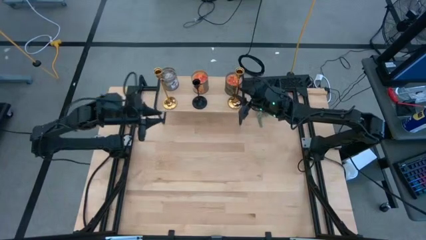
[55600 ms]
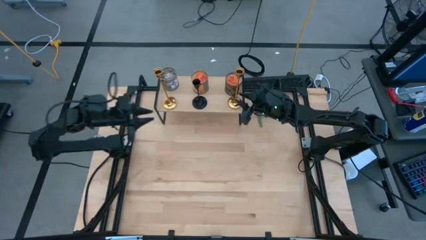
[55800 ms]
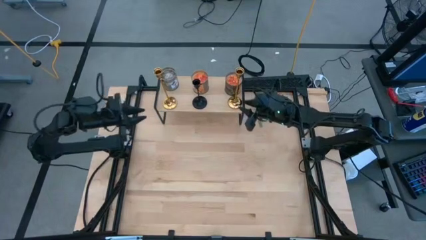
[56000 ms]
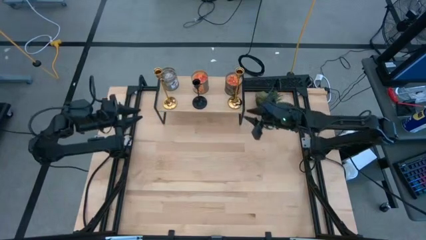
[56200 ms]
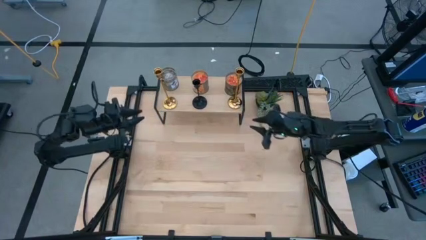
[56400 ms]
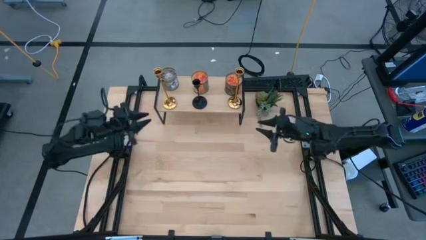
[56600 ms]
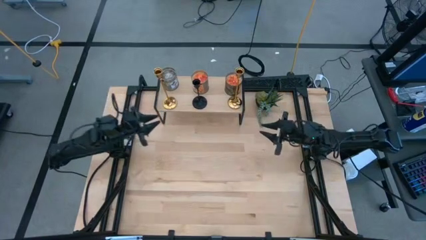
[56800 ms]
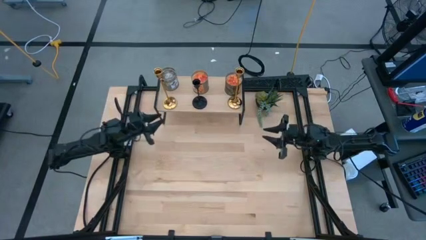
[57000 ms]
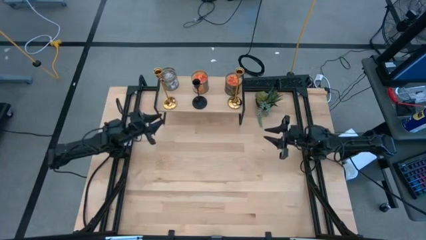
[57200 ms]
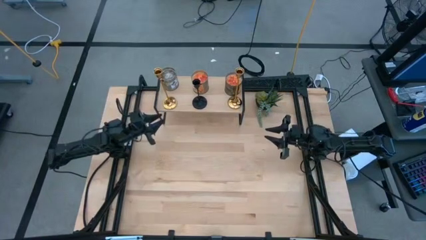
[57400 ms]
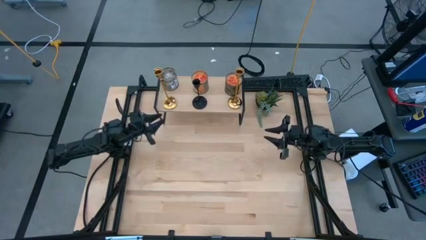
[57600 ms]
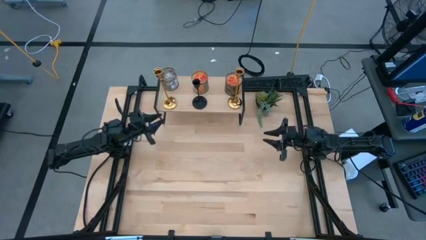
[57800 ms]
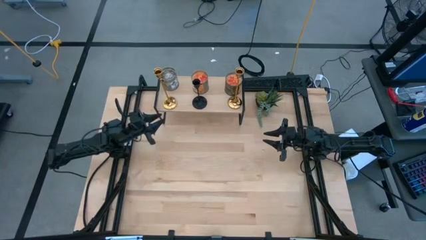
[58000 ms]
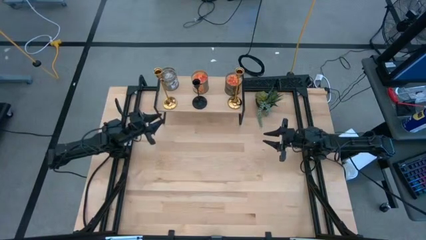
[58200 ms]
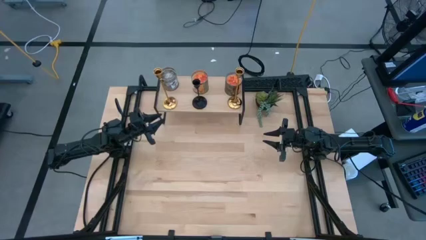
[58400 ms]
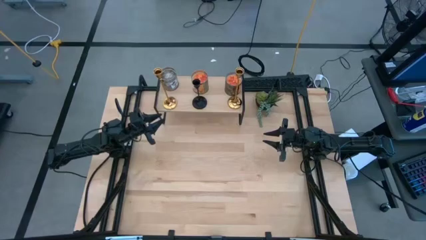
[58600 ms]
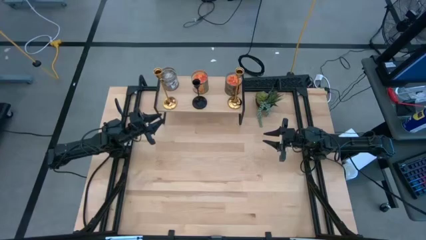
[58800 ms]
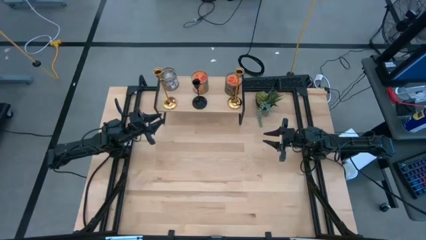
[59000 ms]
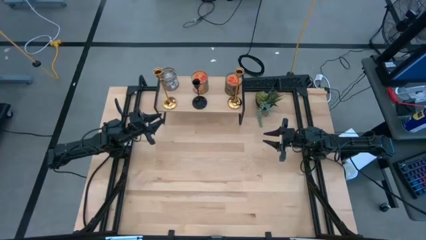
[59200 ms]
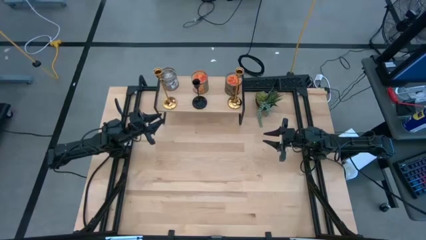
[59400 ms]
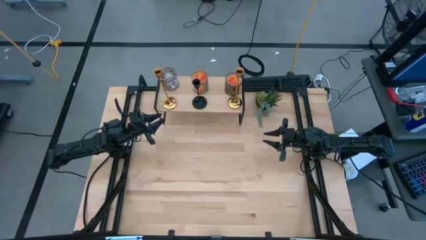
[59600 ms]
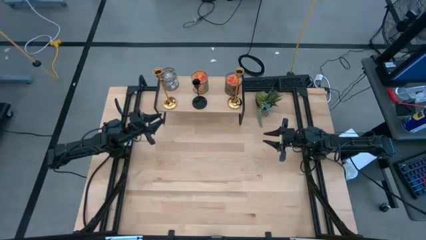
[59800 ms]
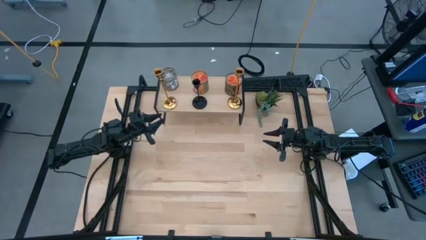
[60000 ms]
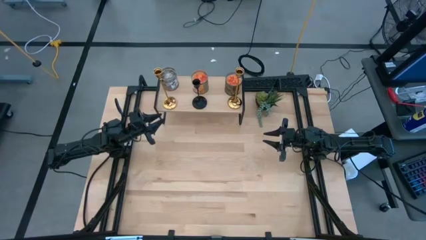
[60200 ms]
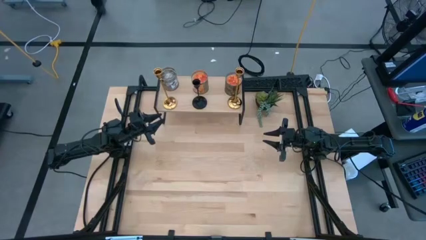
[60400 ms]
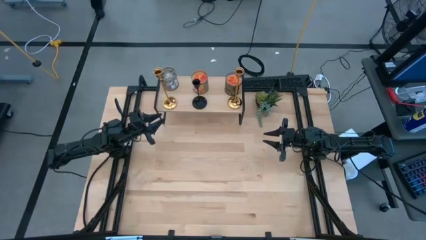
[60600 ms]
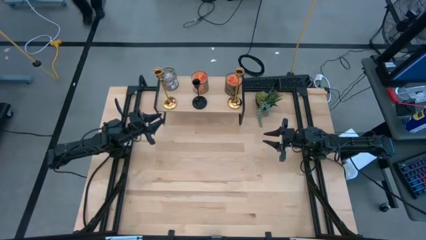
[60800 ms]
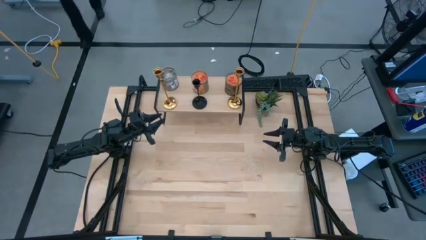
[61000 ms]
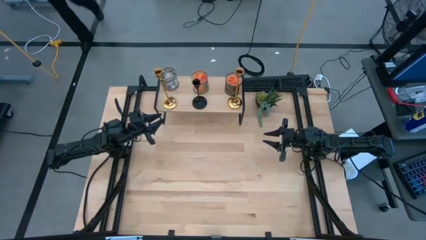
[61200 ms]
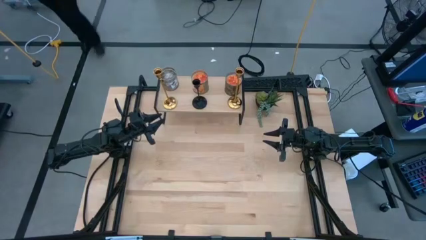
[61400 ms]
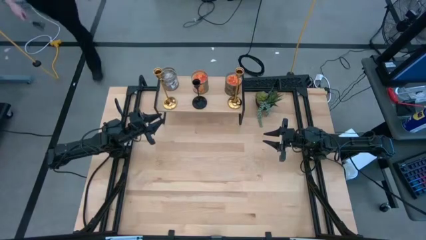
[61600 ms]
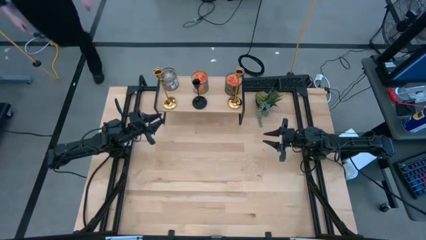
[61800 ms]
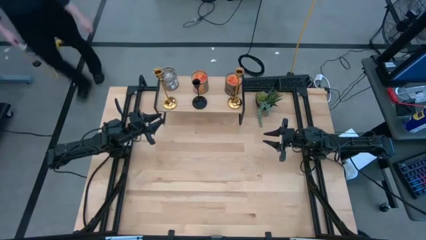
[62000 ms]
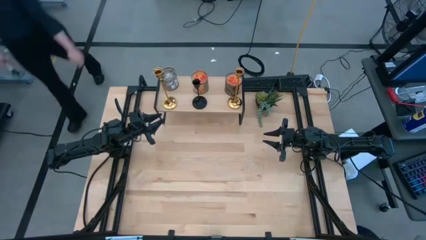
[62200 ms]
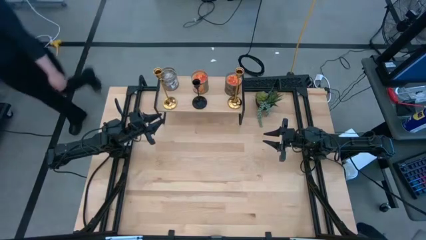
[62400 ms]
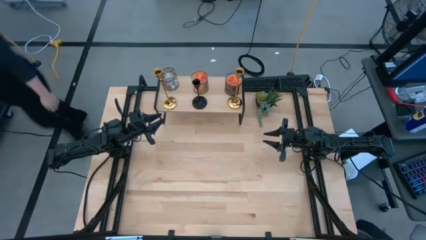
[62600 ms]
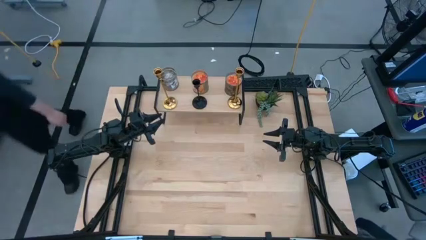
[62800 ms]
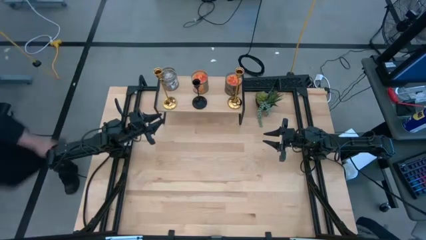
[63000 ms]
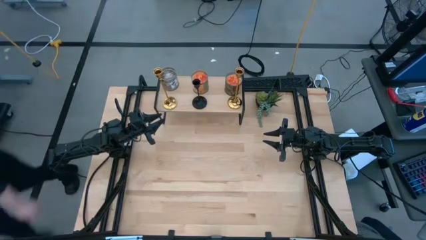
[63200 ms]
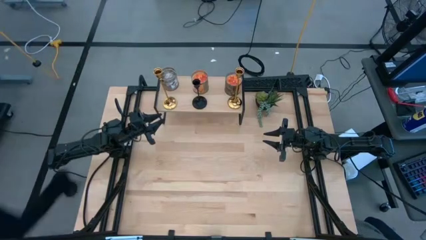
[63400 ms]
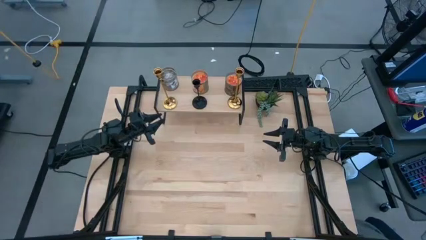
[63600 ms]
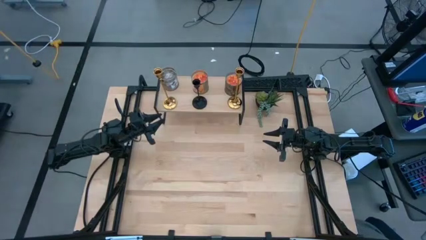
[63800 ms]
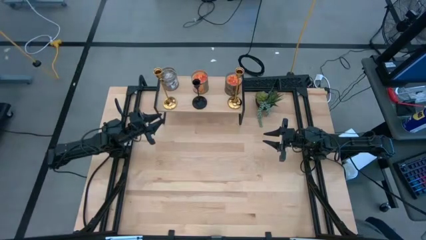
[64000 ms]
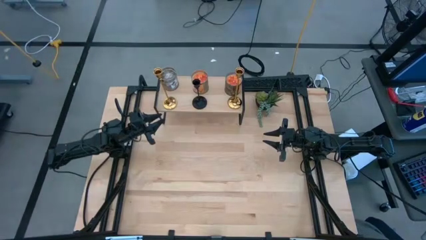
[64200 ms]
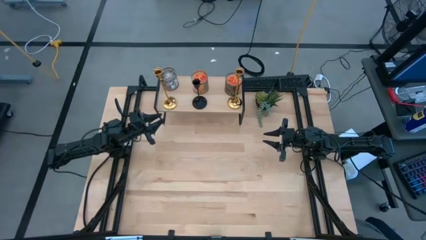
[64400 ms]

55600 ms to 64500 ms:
Task: Pick & Place candle stick holders
Return to Home Position

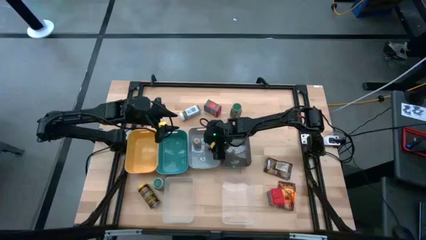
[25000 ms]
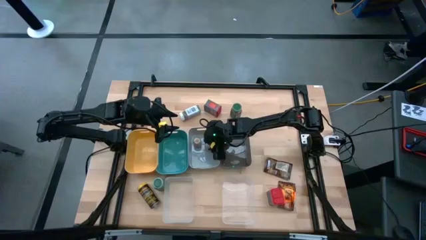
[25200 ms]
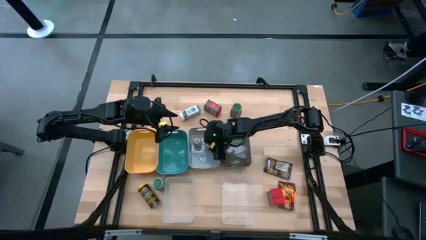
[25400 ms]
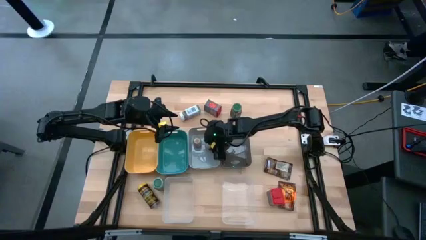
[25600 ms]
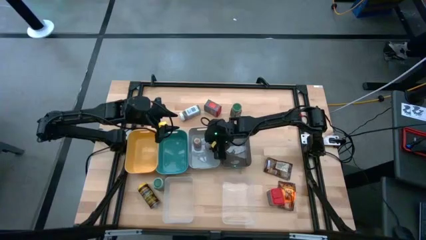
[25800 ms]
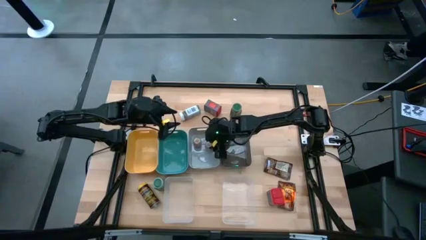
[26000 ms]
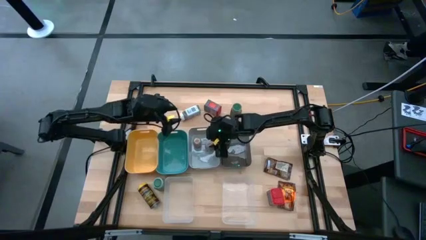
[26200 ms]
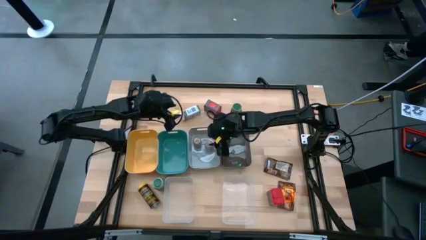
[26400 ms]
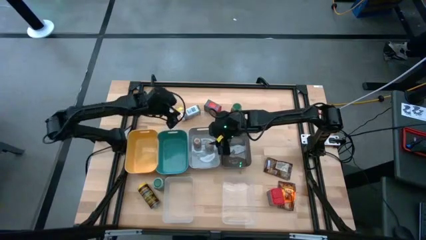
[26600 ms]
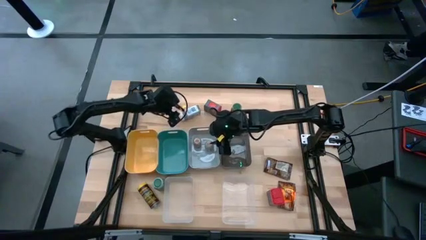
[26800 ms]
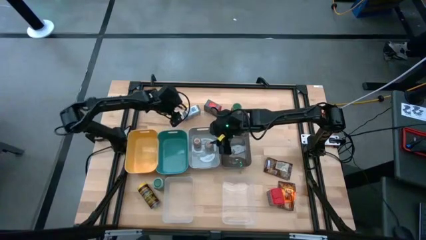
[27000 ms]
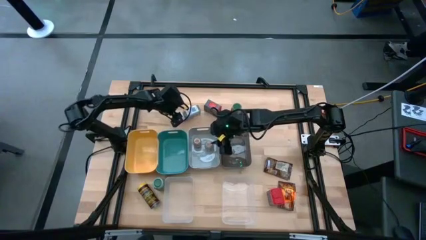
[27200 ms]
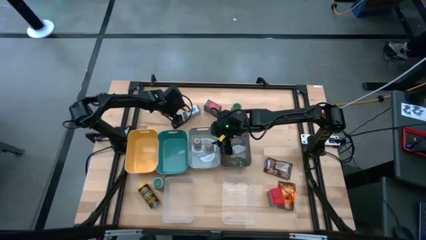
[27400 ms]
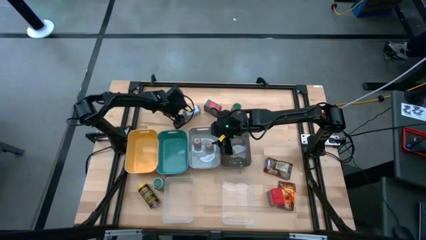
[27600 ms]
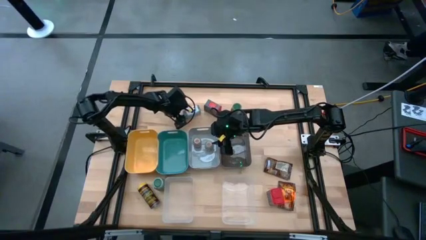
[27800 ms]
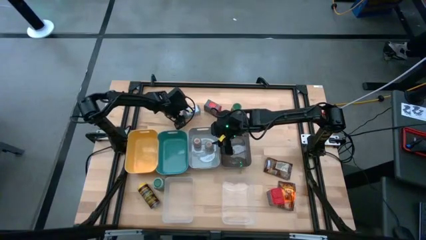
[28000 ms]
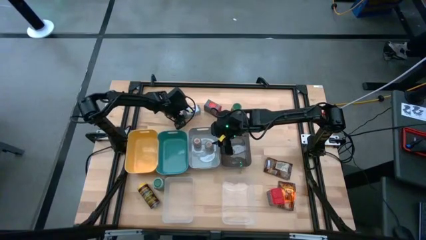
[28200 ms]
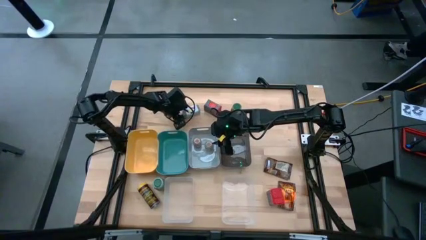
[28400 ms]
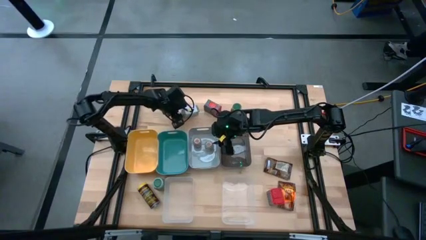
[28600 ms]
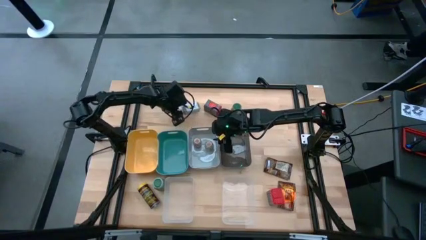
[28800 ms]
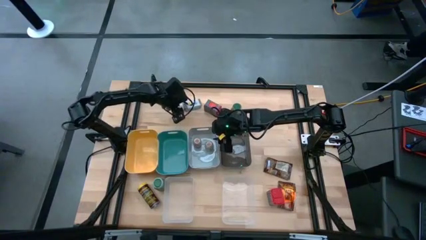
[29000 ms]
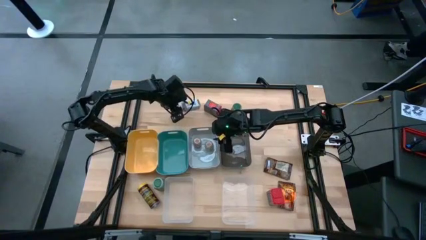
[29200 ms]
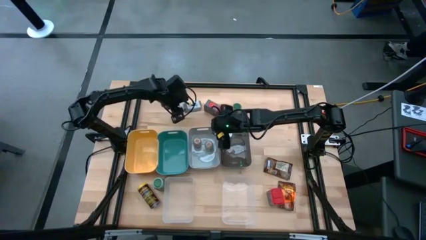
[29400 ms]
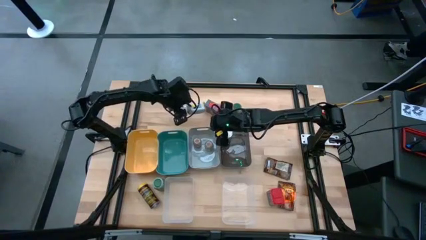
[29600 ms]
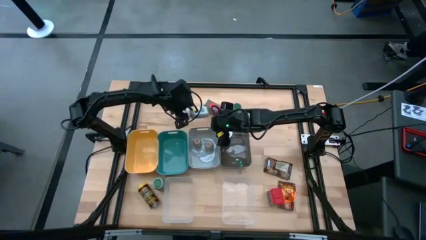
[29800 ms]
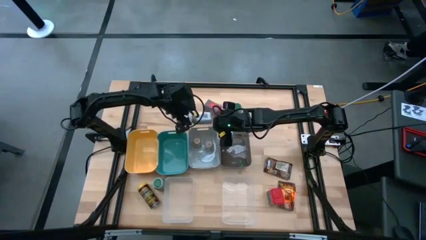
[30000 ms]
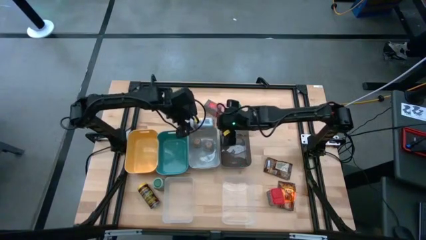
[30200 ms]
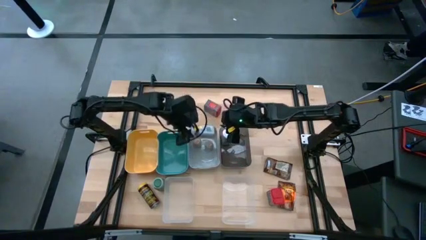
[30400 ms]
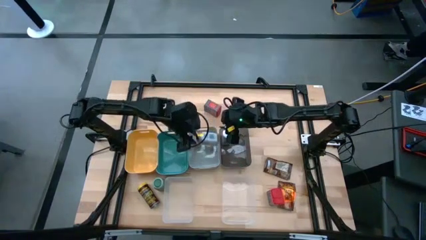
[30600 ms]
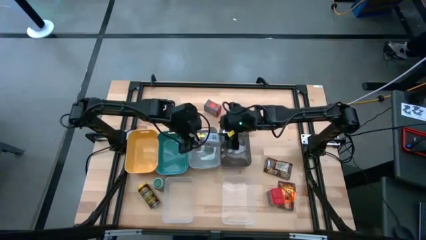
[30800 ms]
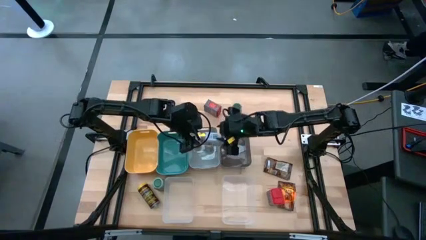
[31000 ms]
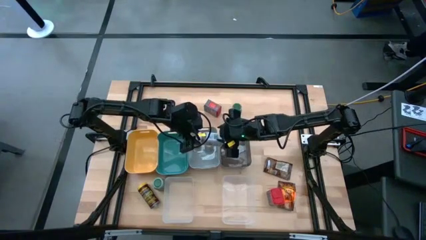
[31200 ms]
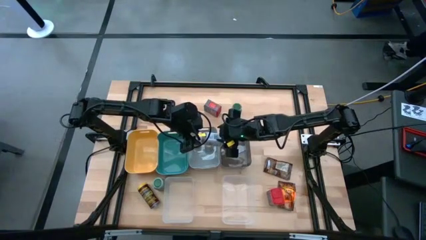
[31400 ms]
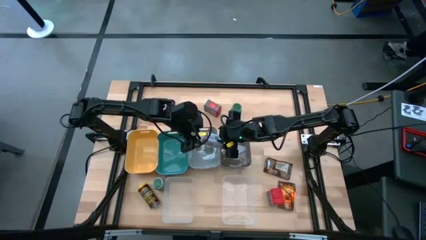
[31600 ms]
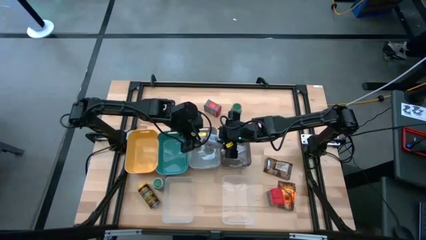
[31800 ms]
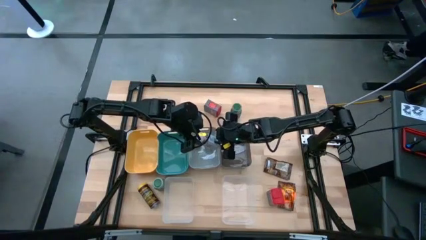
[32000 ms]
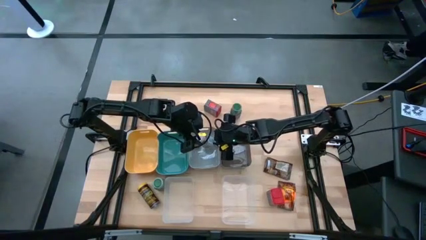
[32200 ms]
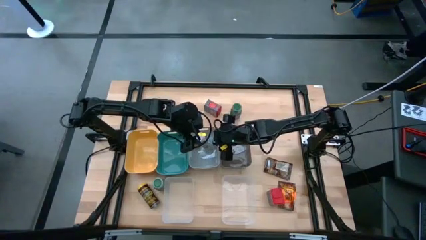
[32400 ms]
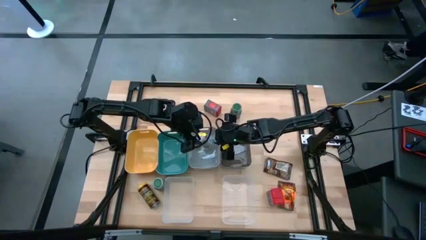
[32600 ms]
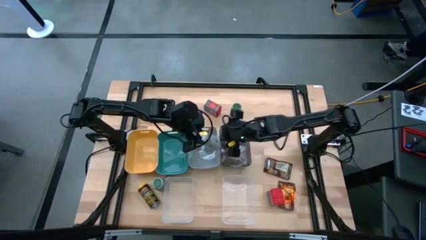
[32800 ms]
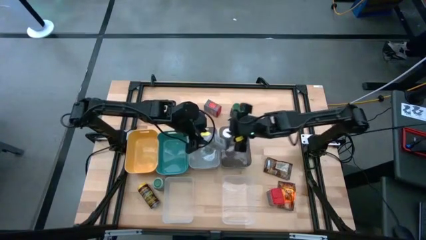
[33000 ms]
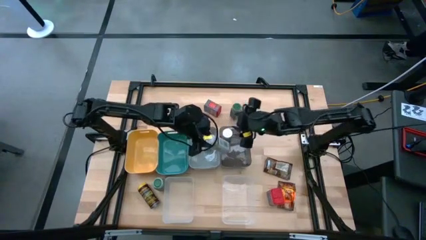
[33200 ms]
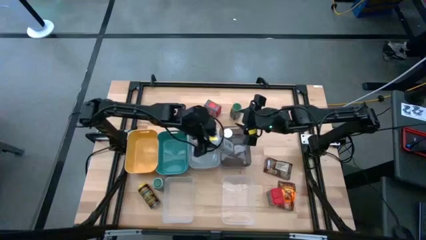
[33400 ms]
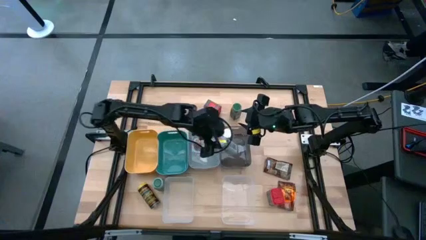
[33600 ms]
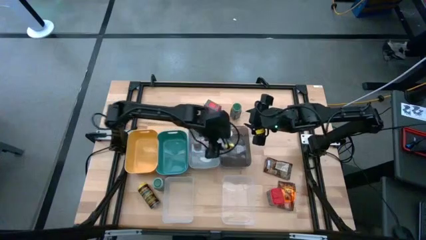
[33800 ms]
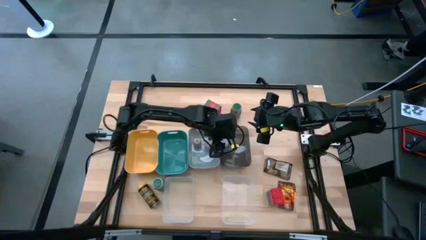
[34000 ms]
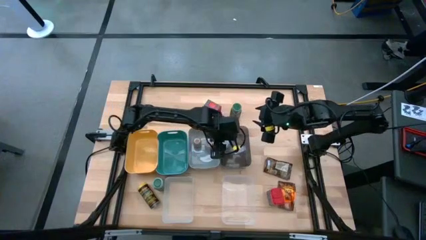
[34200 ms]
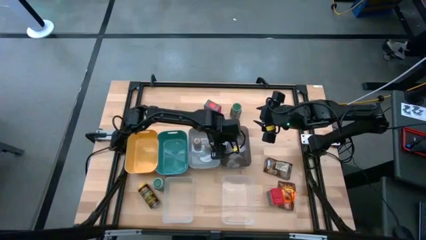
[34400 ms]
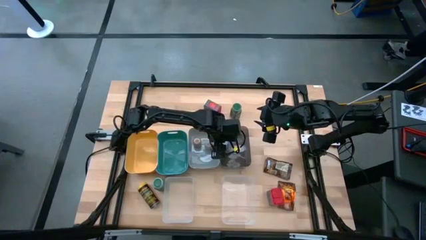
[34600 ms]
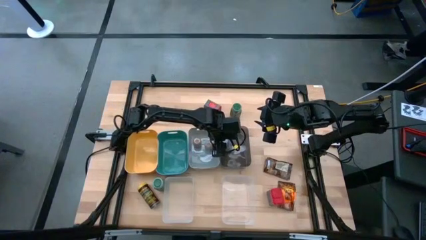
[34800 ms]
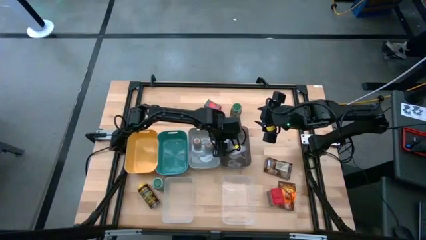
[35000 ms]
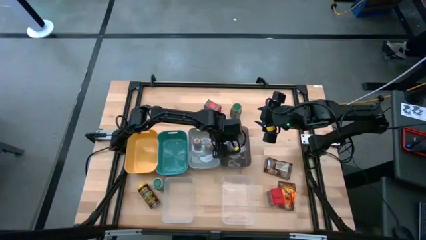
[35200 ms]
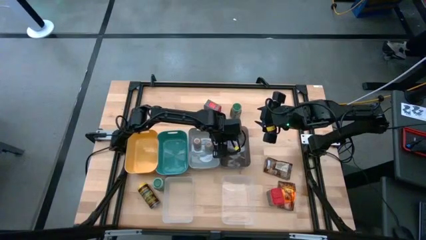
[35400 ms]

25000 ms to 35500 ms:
Task: Sort spices by type
Put the white seasoning bottle into the transparent black bin
